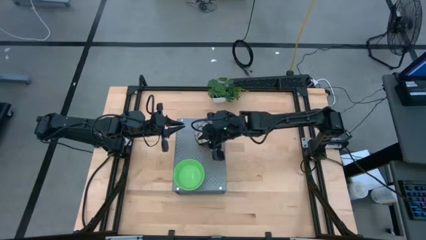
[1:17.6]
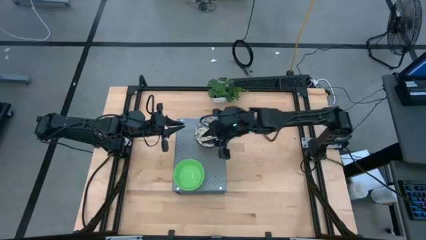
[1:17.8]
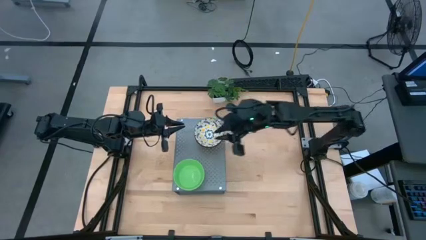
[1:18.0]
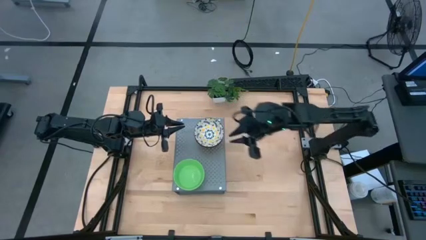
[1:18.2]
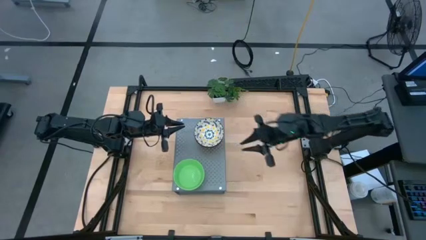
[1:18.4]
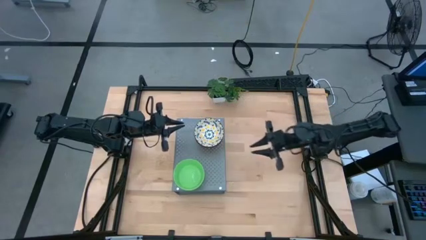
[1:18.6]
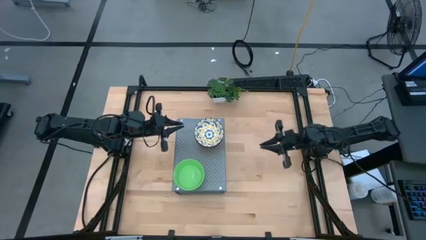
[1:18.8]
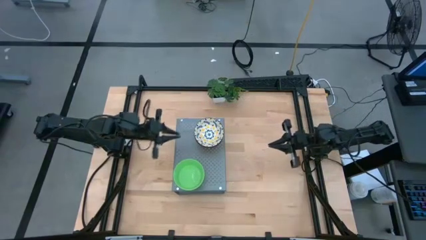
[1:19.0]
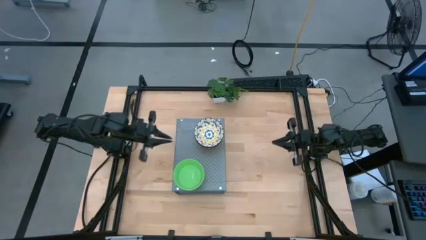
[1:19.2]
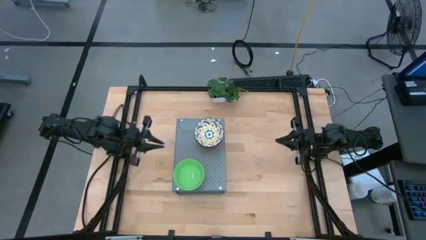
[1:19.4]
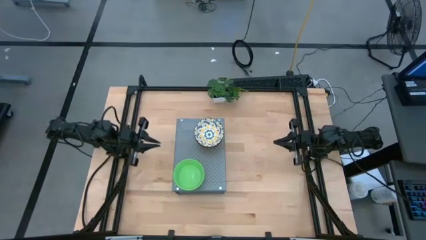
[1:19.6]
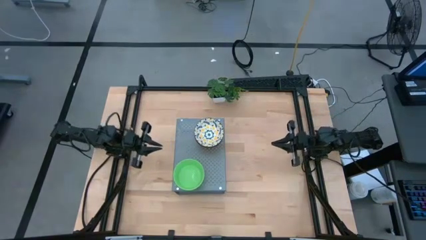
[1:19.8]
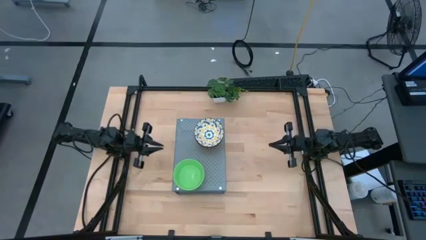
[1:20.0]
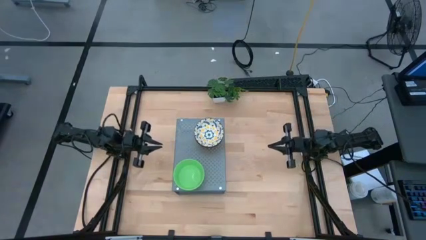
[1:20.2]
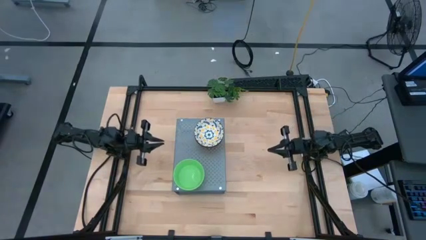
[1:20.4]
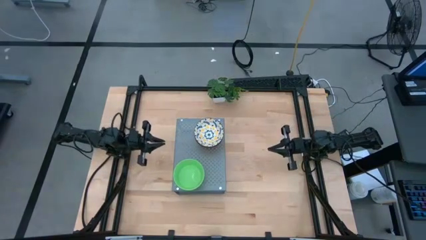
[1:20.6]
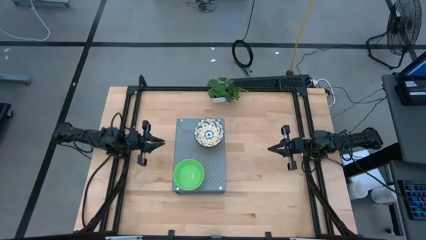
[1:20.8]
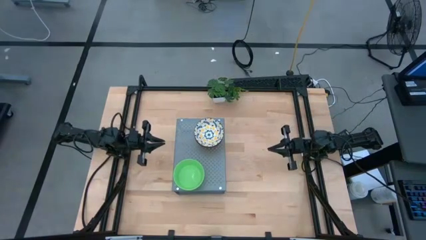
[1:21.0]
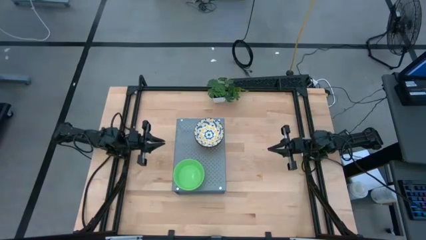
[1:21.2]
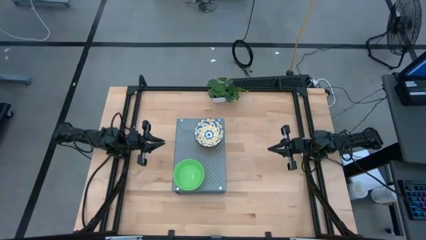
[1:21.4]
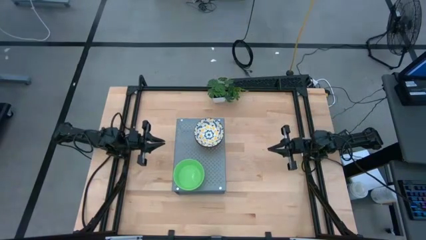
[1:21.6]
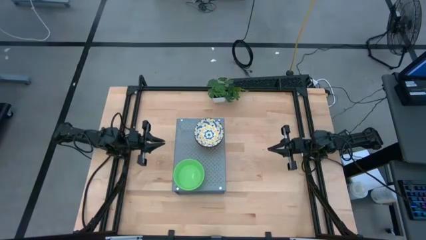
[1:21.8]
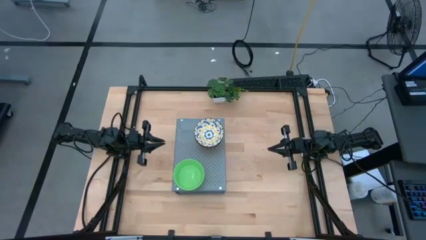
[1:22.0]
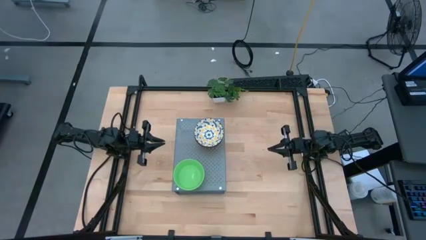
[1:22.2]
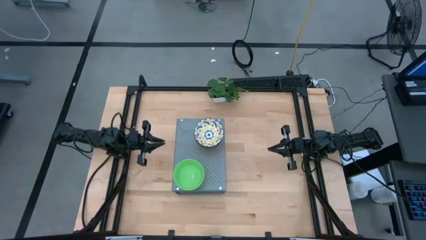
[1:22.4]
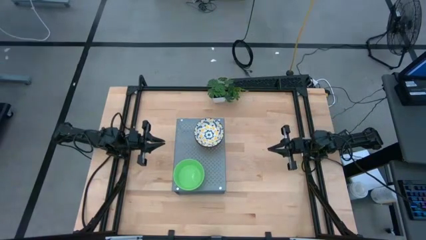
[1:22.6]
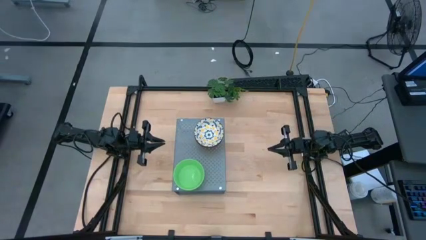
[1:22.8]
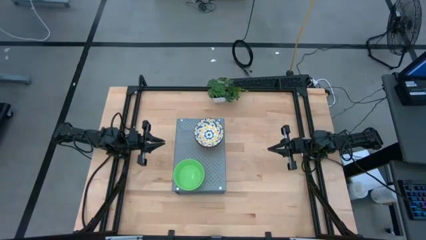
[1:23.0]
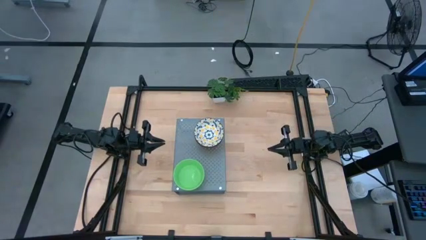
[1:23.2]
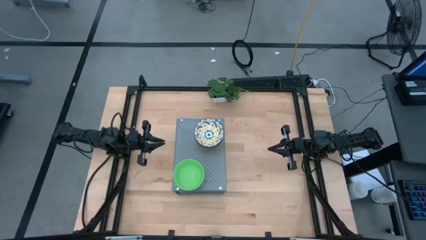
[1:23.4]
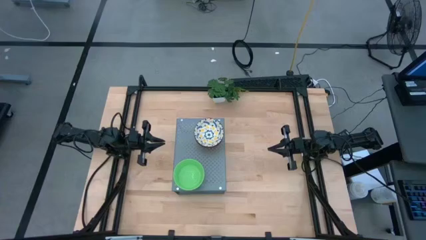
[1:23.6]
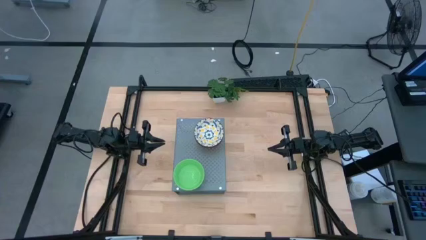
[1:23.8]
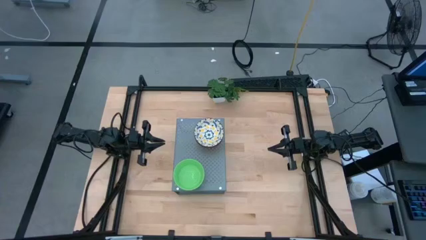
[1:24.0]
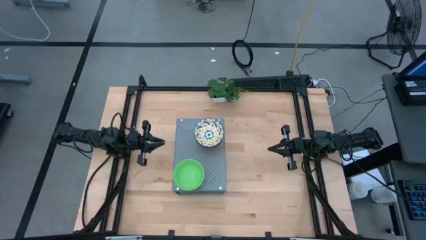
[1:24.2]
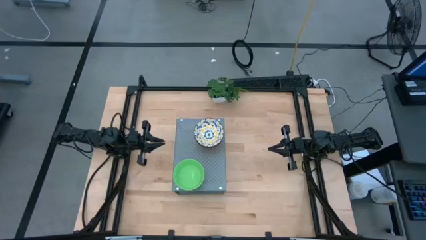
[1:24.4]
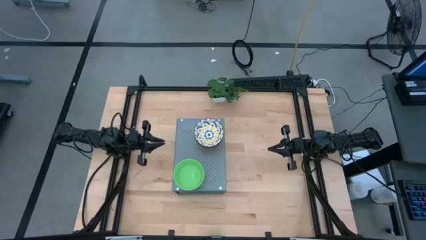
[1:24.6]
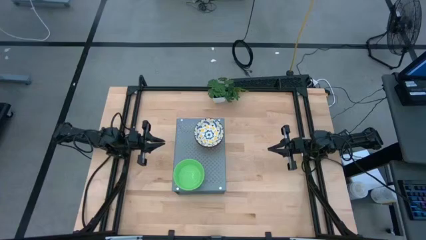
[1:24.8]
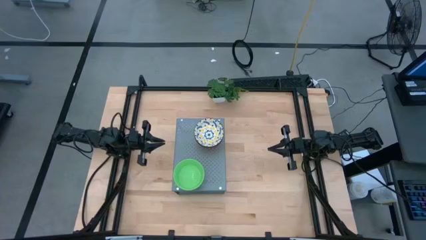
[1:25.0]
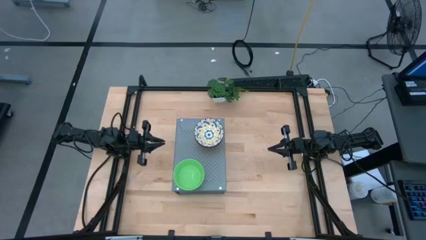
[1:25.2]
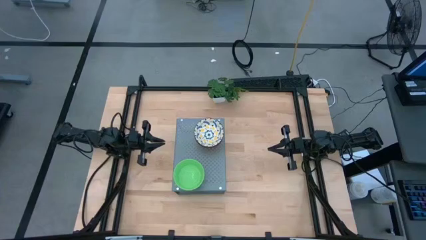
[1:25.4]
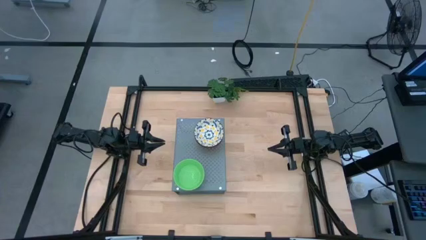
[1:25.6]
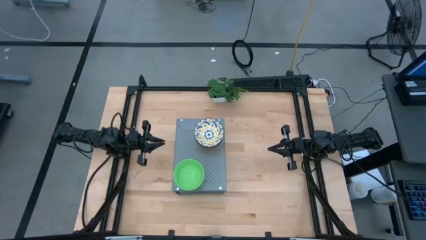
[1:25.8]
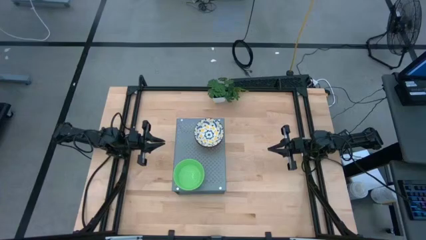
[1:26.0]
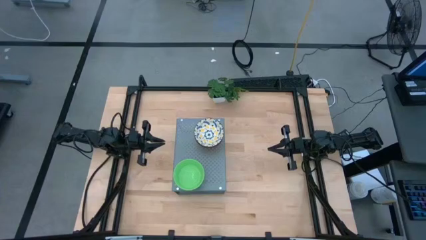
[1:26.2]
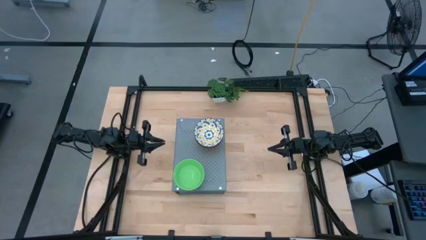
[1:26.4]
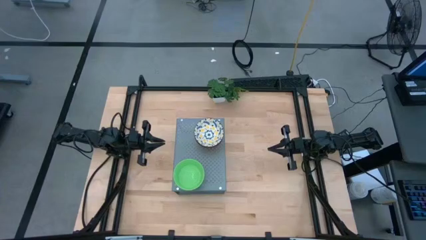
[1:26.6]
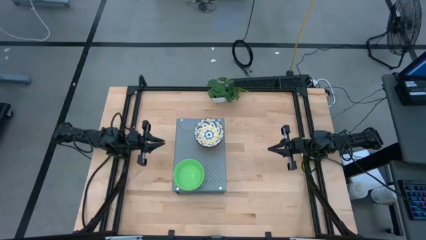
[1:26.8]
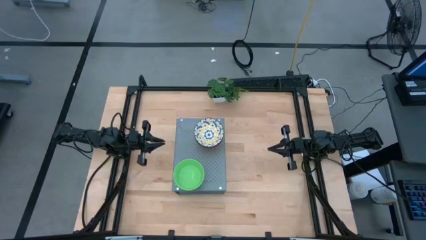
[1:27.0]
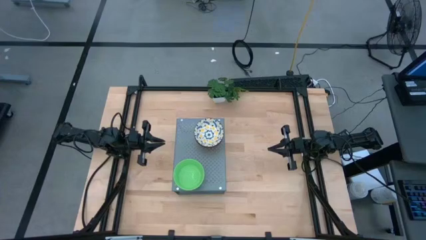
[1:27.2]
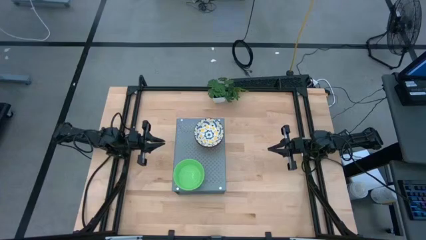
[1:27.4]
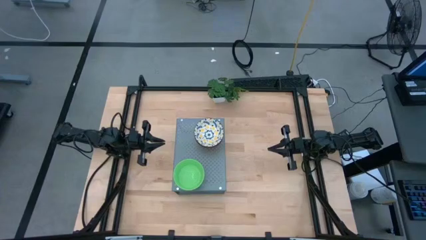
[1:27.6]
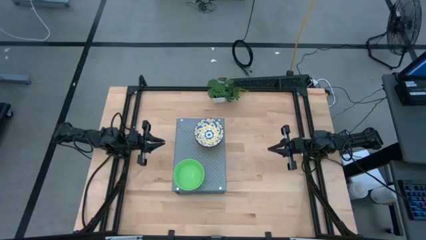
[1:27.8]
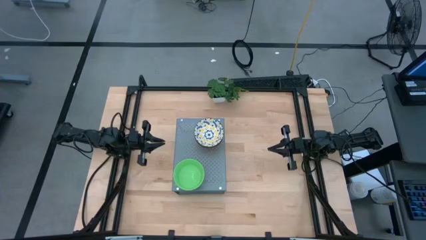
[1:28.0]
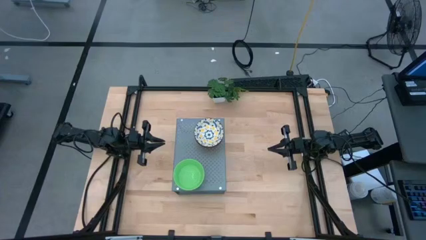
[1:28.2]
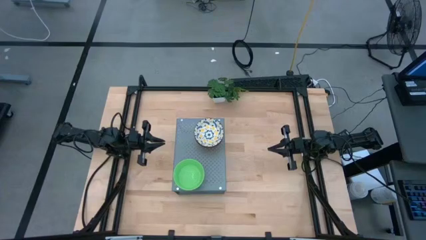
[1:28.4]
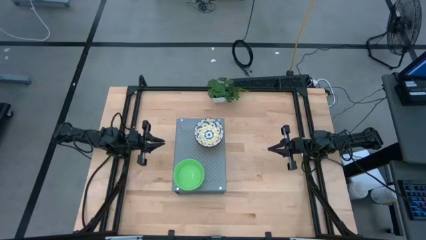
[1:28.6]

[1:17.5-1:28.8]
Task: Pick & Place Mini bowls
Return to Home Position

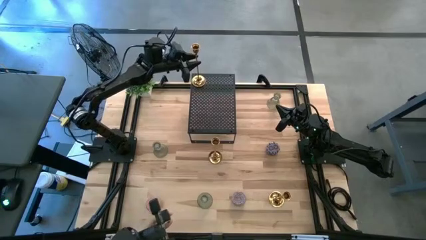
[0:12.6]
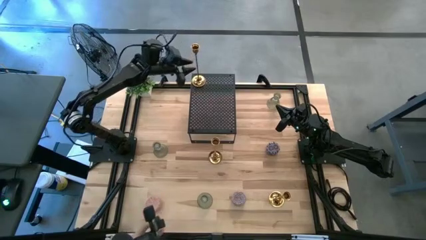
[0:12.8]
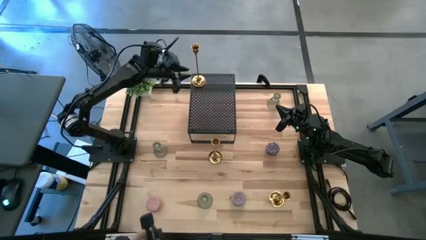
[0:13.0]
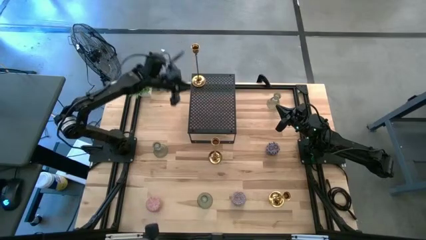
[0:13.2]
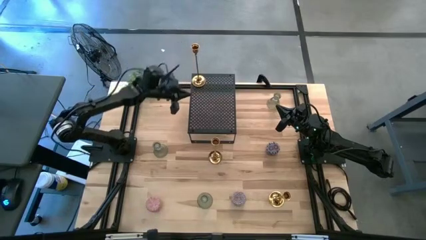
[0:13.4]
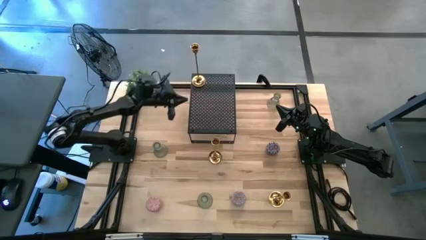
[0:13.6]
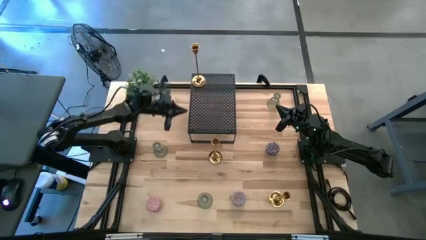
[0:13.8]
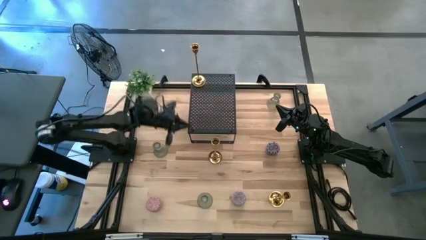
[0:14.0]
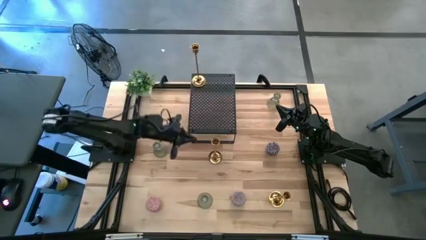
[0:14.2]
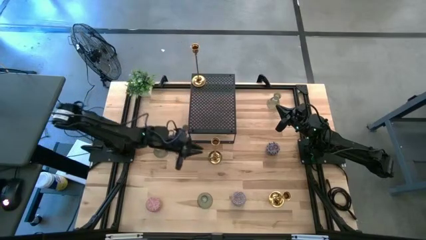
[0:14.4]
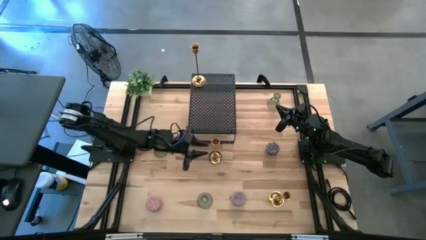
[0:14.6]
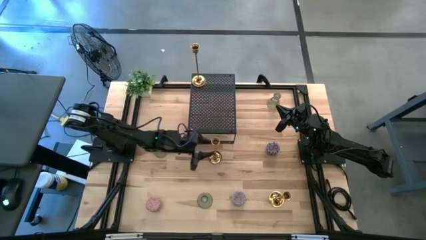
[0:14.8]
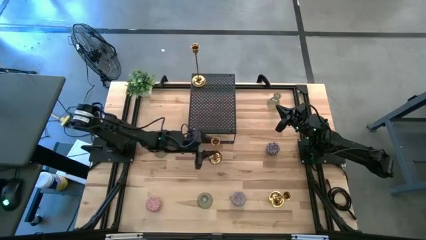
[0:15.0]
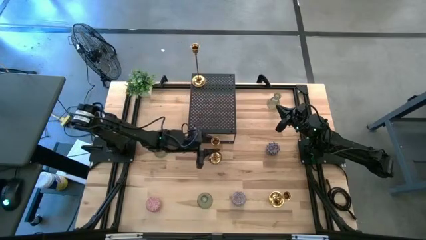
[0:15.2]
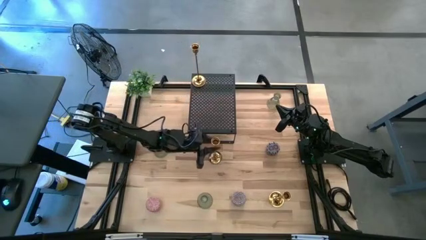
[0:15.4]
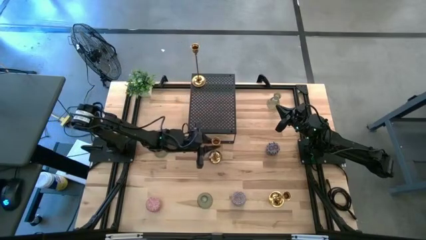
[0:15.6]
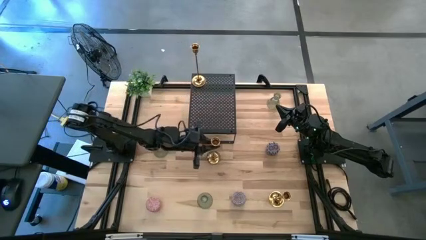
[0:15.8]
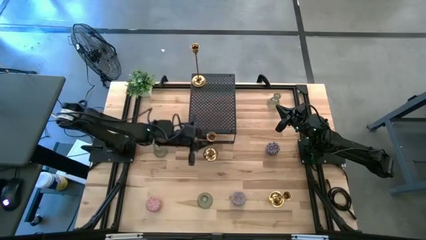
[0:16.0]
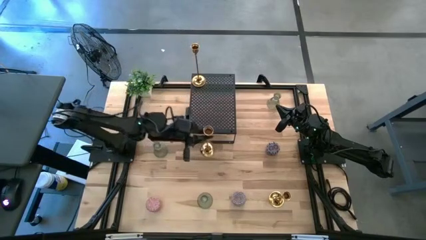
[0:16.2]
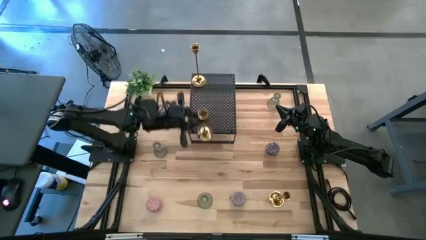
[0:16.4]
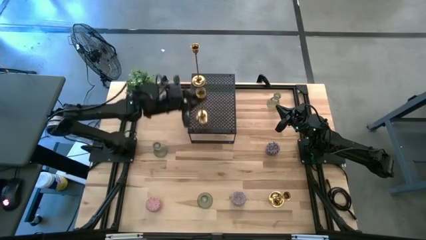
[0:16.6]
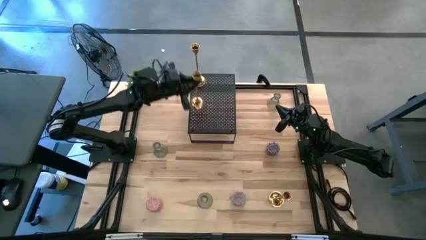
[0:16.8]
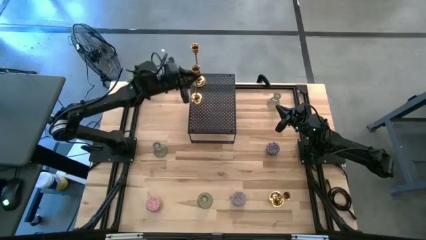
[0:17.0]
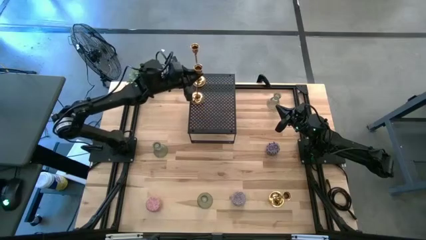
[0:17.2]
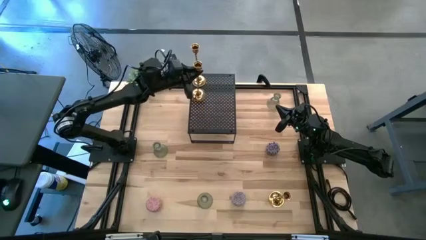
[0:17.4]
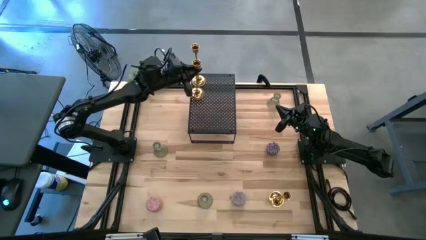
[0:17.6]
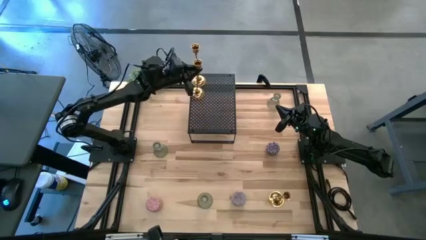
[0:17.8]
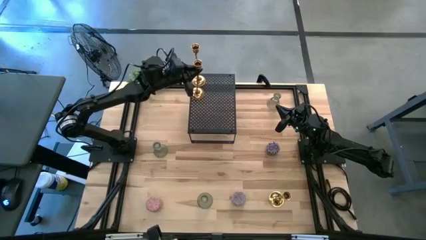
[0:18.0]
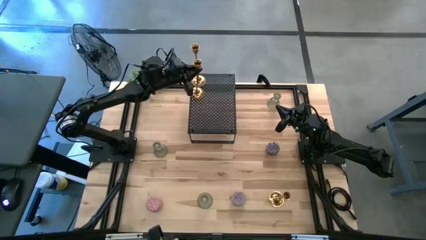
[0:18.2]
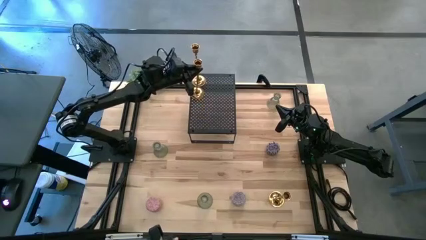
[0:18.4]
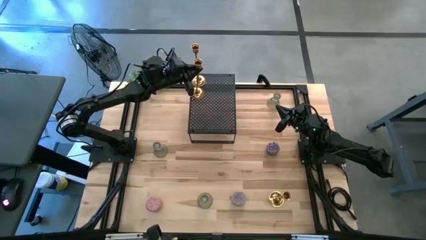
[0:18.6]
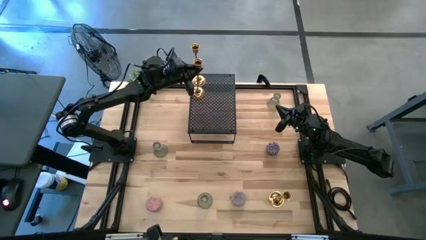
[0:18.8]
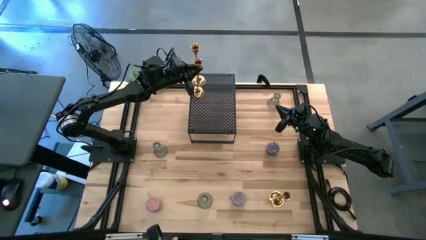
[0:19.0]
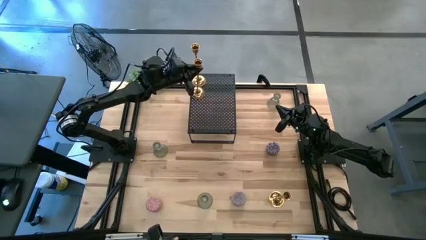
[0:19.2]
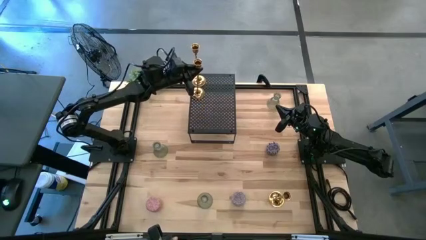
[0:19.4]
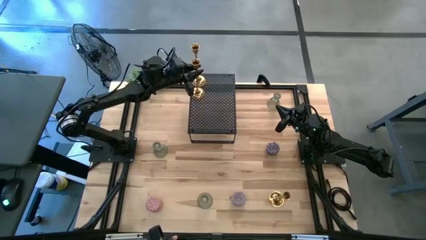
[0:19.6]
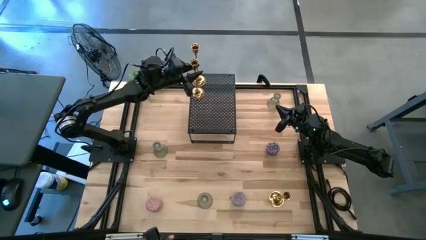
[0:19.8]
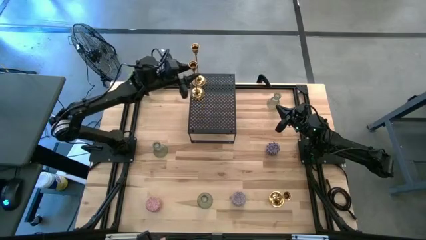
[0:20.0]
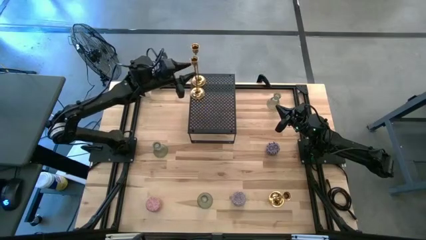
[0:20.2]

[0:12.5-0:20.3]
Task: Pick & Place candle stick holders
Put the left gold candle holder on the shelf aligned with the other gold candle holder
